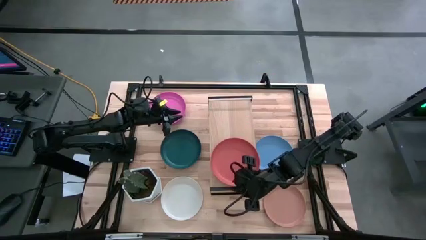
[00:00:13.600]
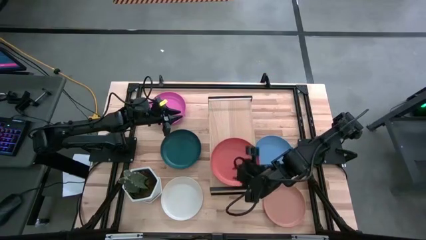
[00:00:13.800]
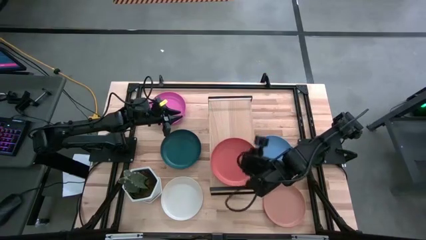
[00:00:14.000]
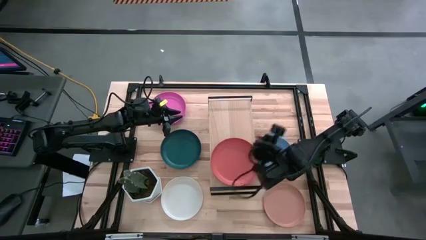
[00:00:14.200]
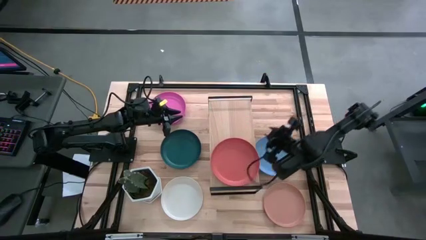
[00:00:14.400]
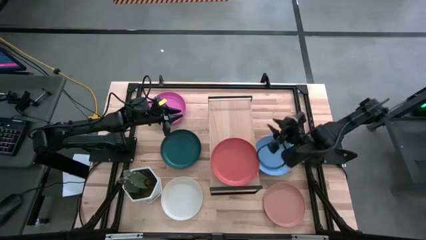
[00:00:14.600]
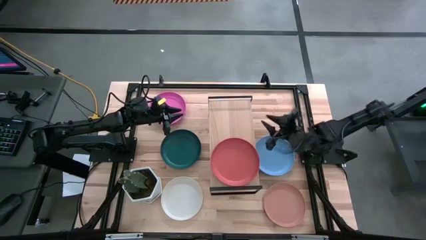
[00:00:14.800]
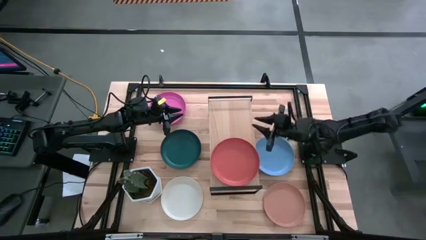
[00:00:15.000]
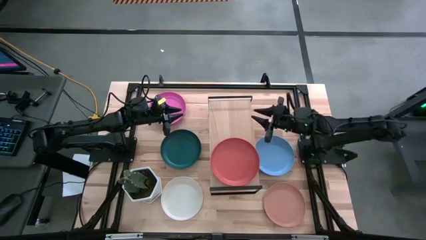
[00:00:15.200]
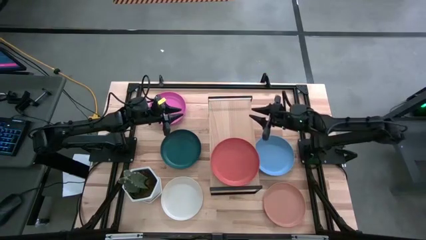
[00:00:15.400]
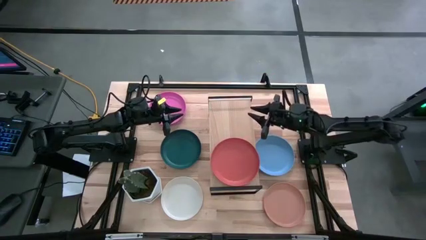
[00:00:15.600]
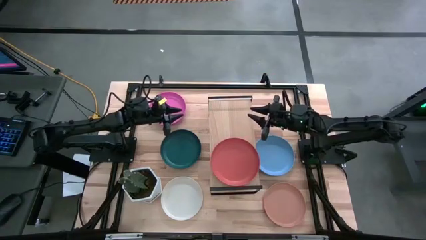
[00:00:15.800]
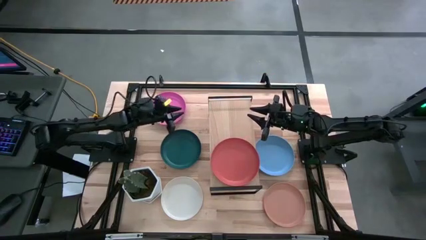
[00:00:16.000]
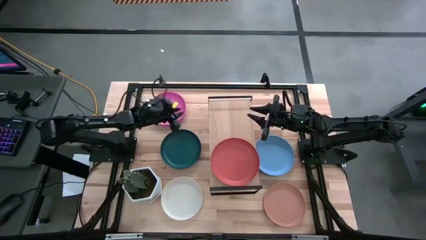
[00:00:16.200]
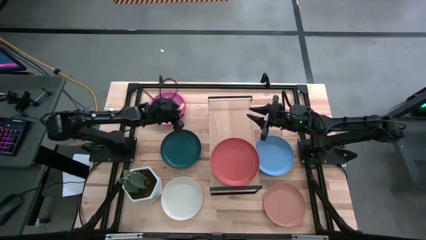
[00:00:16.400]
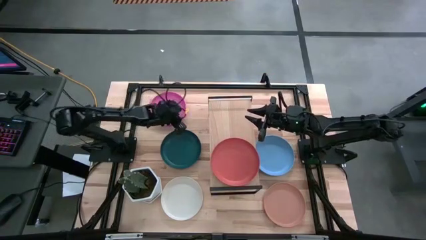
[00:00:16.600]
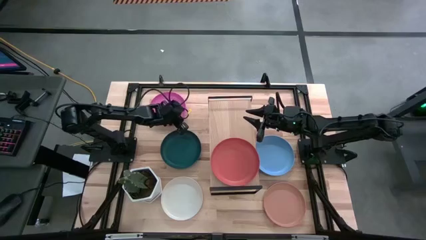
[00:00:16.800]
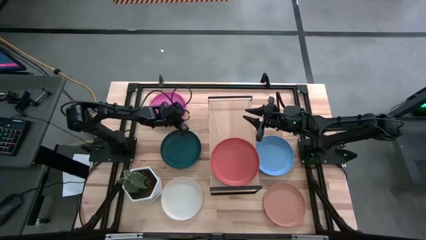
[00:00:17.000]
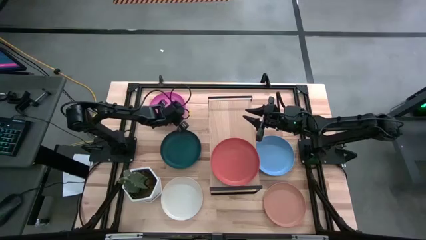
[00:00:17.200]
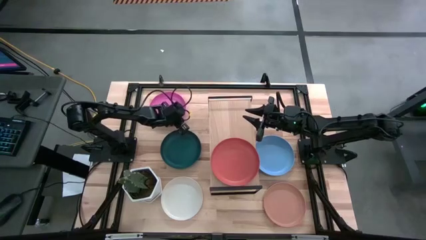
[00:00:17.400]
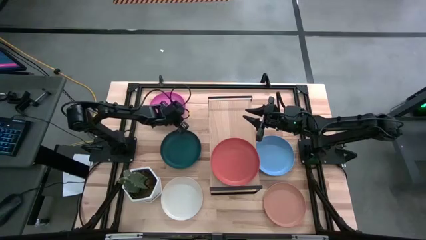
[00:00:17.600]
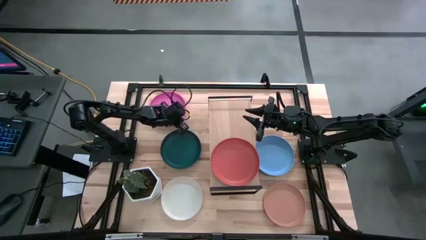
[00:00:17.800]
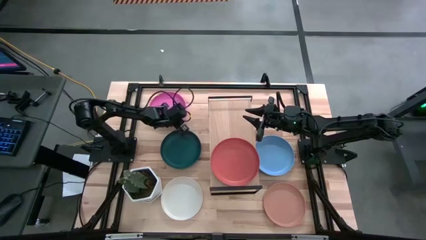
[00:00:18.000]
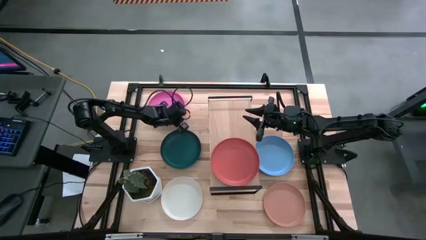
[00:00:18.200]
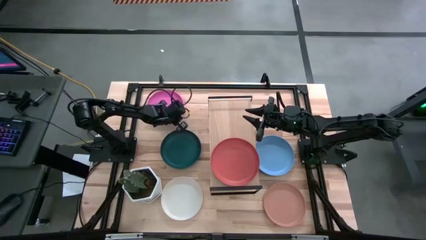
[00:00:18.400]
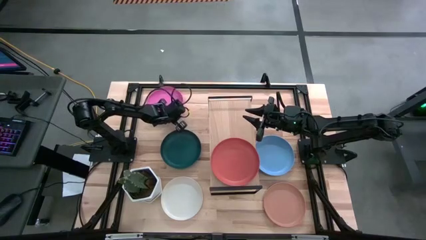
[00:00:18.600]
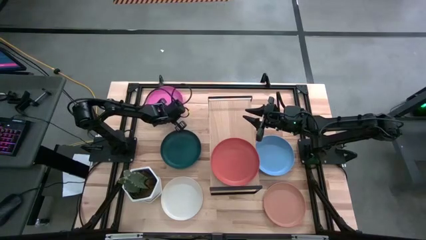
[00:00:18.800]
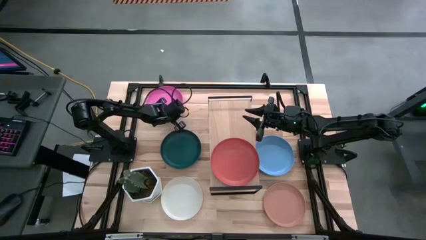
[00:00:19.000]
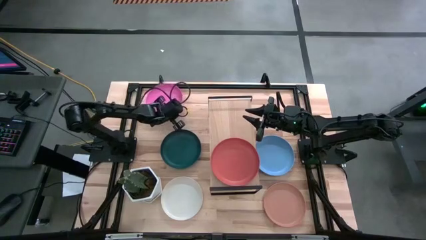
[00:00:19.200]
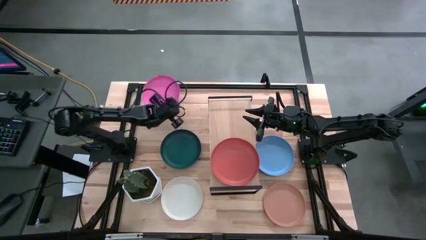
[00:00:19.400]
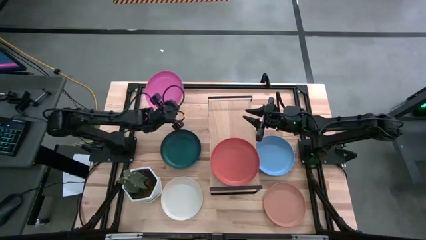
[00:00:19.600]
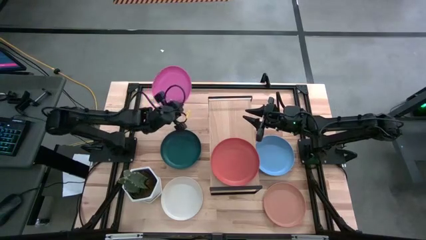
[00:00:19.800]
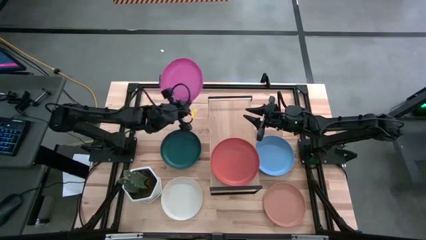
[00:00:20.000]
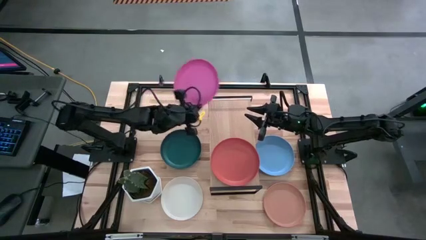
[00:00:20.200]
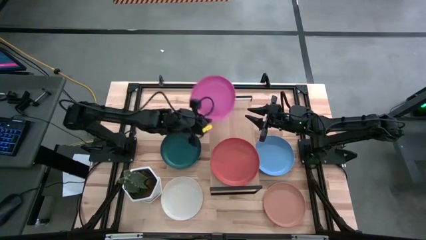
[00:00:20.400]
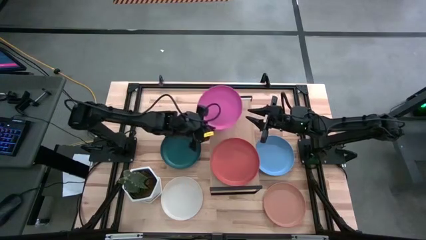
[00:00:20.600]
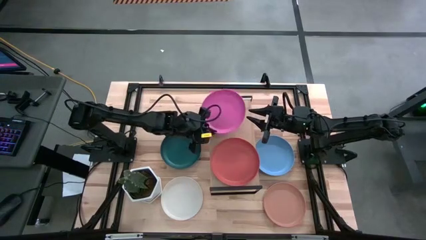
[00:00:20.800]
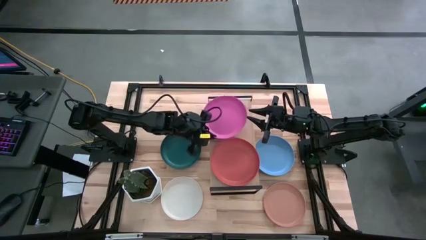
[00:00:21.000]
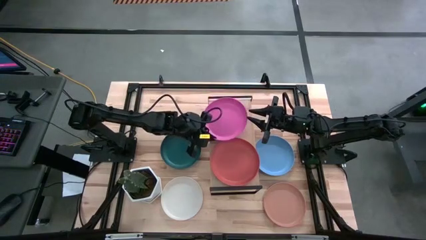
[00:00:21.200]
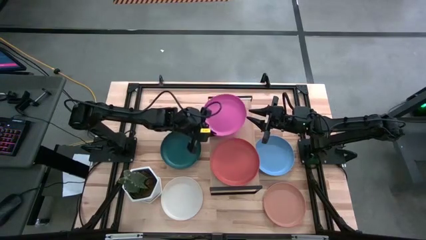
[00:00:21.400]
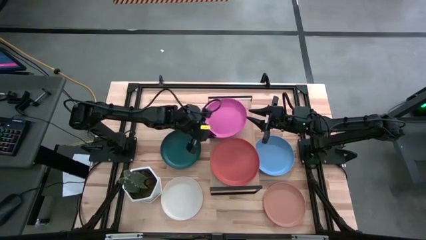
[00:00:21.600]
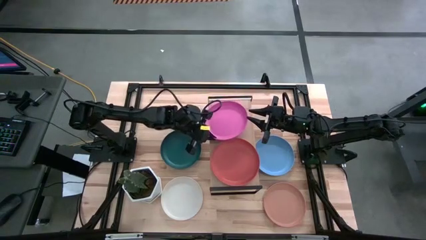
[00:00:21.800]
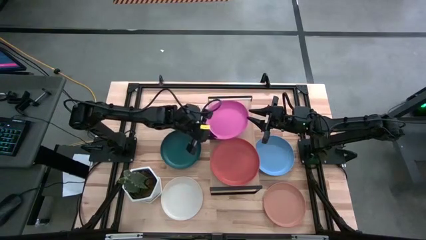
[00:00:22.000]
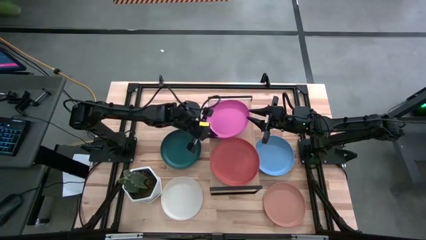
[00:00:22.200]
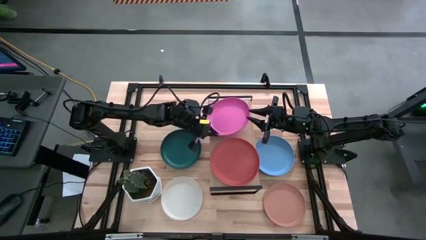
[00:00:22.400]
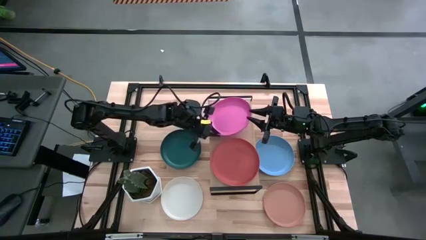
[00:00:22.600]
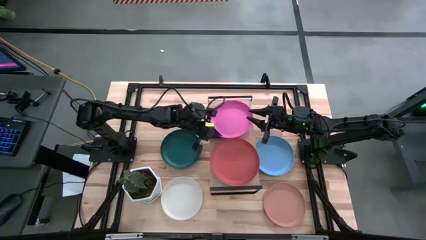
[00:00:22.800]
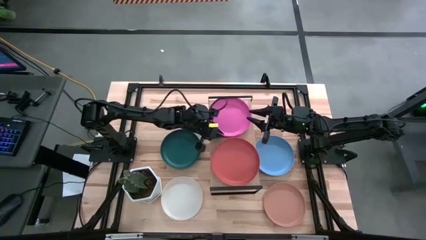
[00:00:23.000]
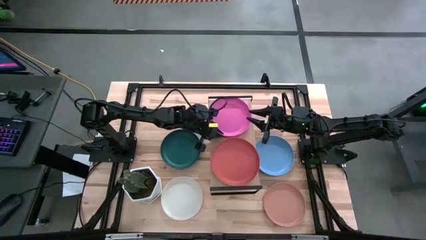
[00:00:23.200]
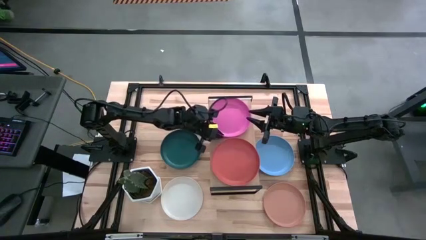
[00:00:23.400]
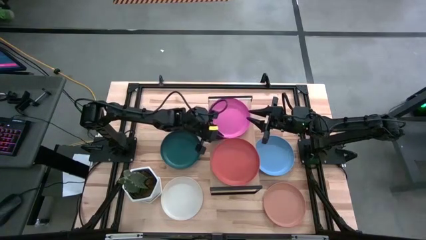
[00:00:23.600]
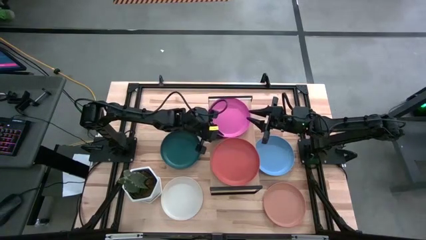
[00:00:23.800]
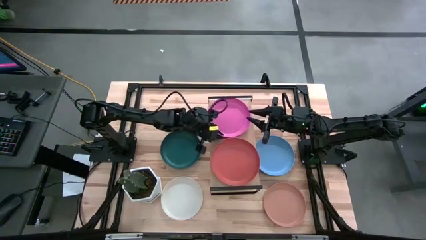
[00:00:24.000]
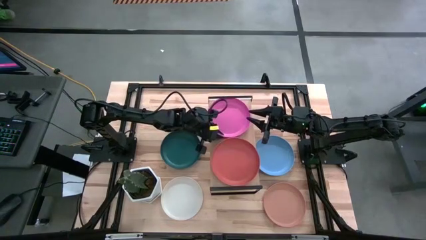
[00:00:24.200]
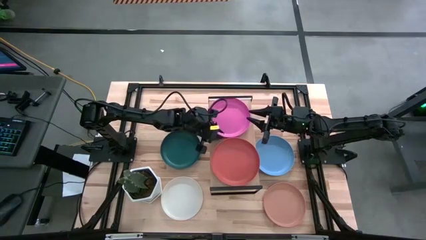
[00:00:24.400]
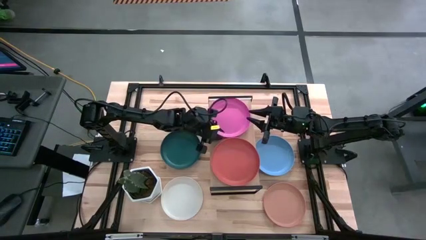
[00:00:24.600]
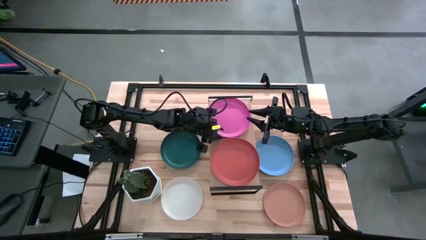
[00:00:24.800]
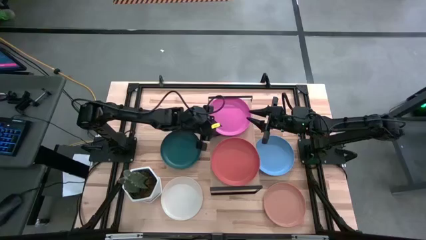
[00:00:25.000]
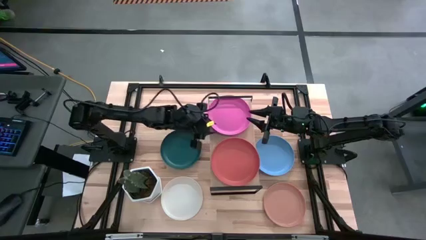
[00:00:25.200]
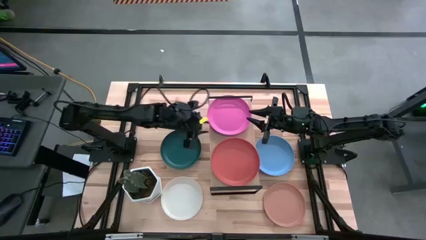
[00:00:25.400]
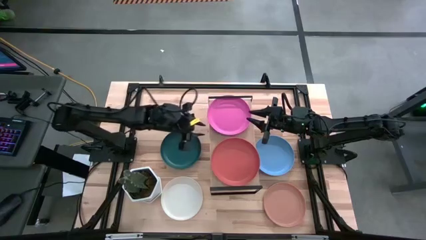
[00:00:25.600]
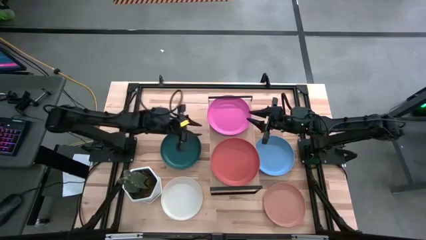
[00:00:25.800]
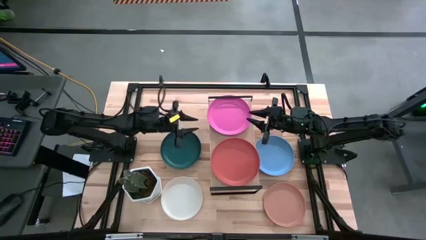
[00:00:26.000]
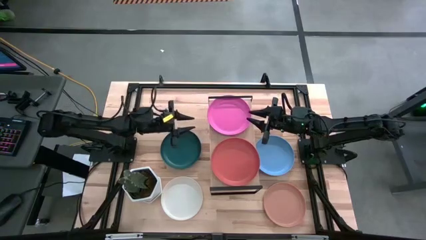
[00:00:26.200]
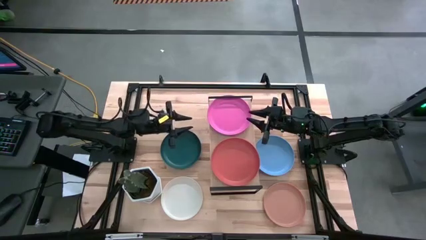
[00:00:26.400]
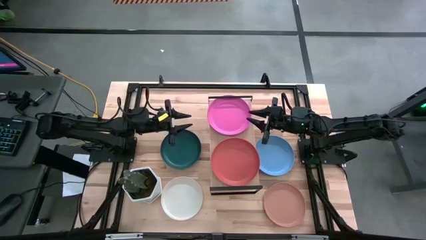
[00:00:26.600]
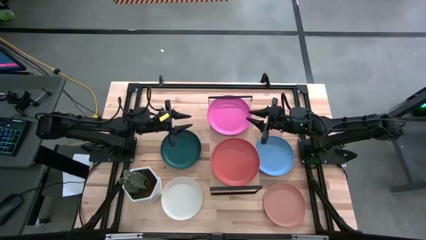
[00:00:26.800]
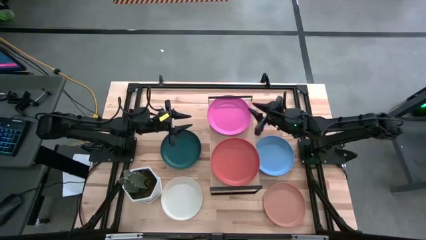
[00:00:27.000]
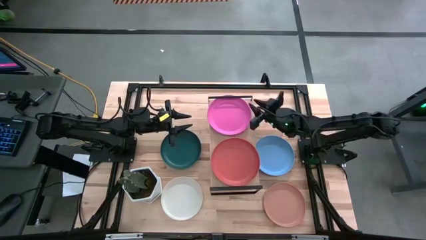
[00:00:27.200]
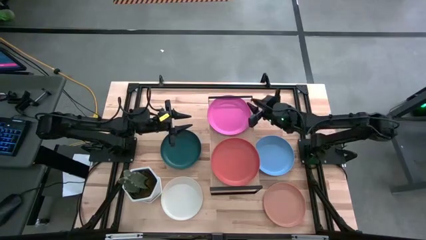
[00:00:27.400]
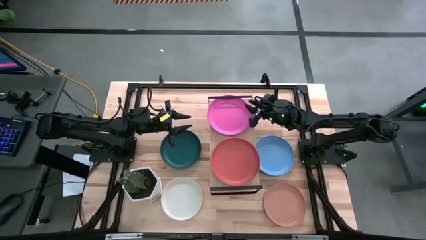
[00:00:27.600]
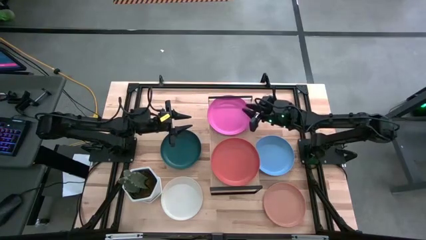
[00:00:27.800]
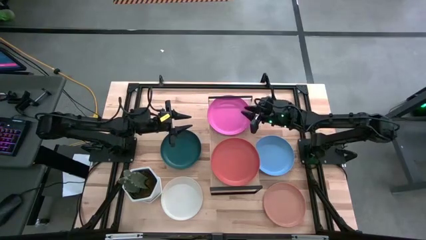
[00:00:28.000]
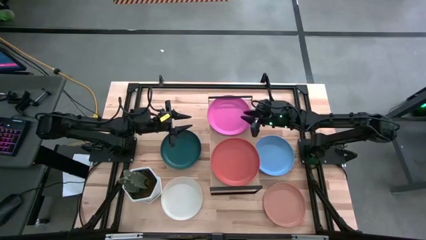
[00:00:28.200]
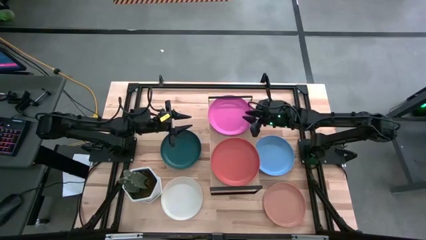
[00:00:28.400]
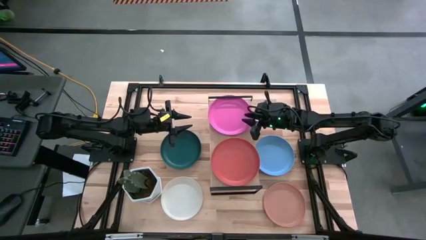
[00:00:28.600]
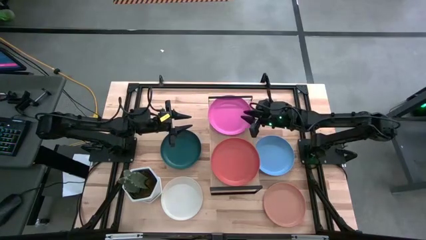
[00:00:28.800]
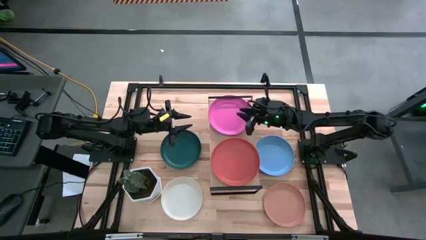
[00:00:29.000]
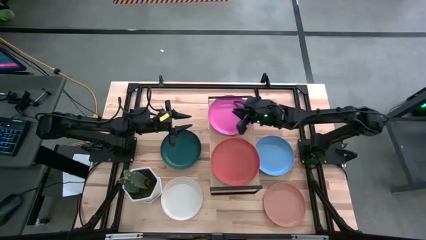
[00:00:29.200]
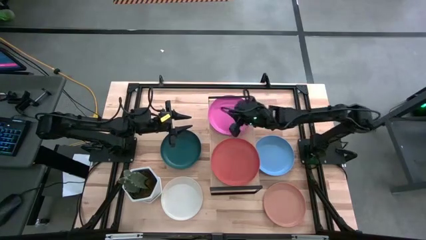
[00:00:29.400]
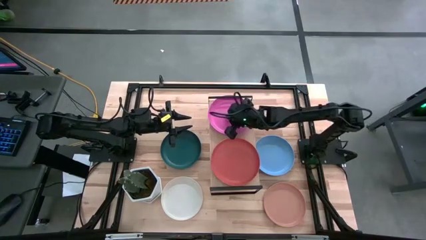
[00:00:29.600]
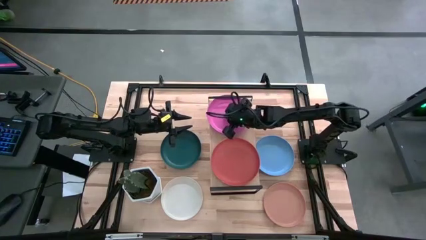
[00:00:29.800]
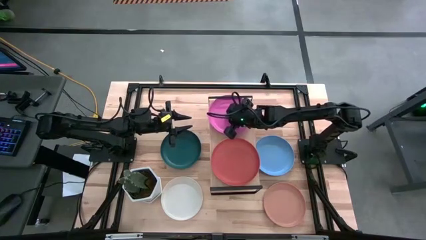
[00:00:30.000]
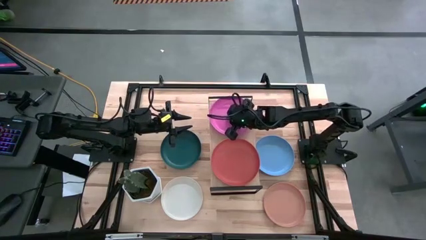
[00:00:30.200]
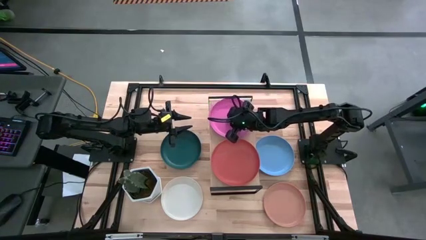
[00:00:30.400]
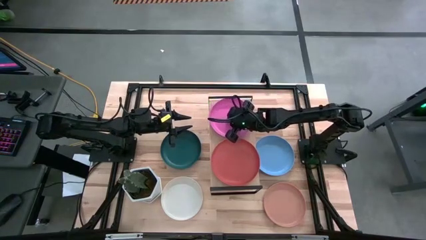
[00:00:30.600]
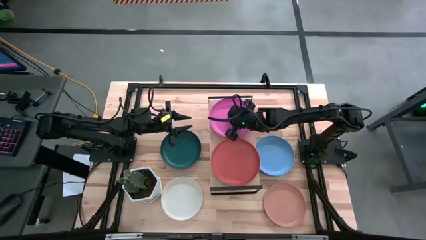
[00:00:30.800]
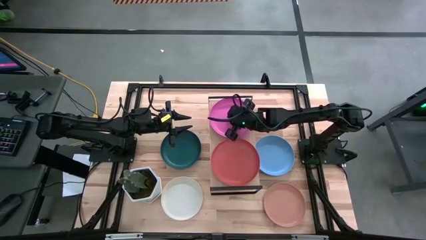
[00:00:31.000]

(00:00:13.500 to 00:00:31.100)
Task: Place and stack plates onto a shelf
Put the pink plate on the shelf
